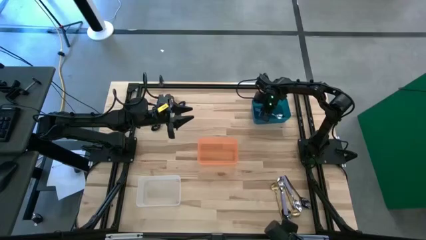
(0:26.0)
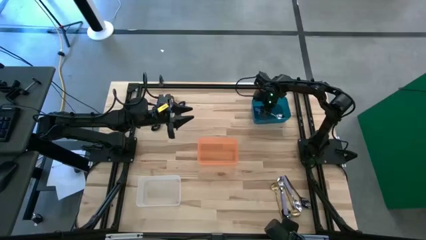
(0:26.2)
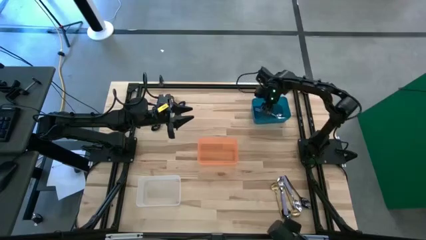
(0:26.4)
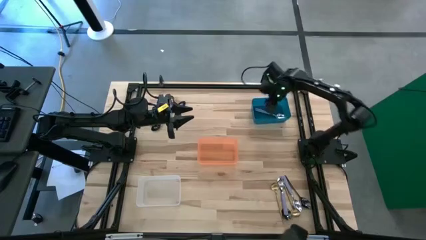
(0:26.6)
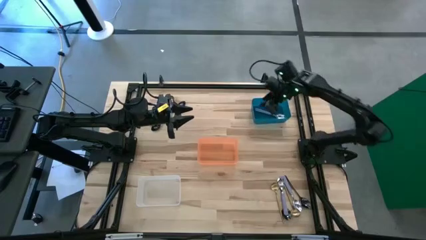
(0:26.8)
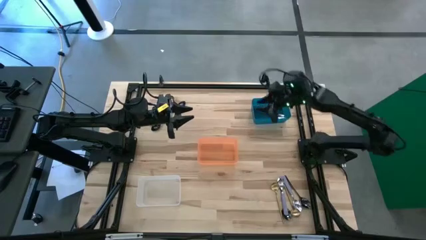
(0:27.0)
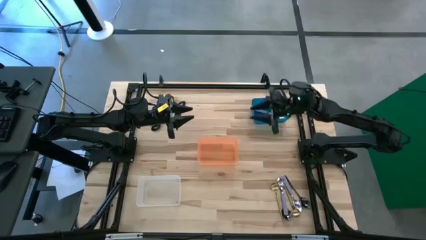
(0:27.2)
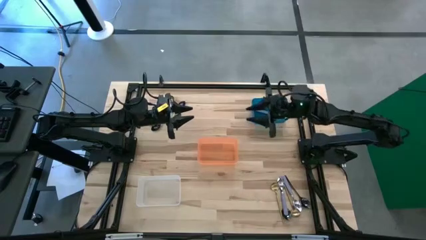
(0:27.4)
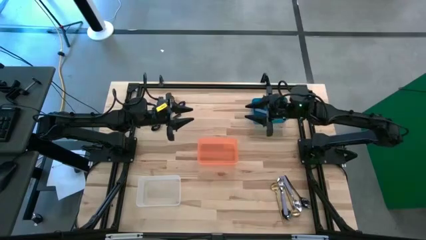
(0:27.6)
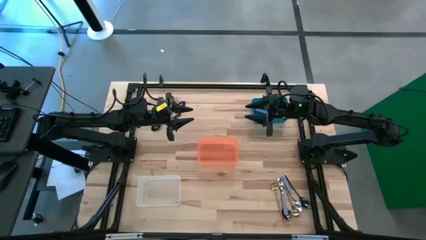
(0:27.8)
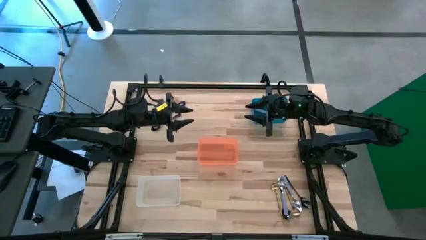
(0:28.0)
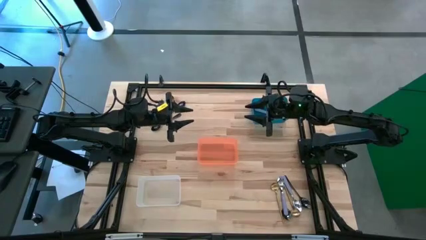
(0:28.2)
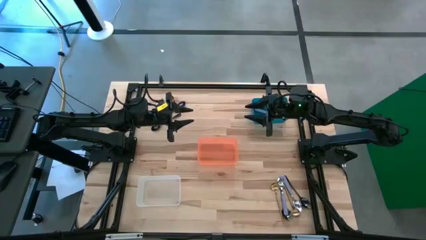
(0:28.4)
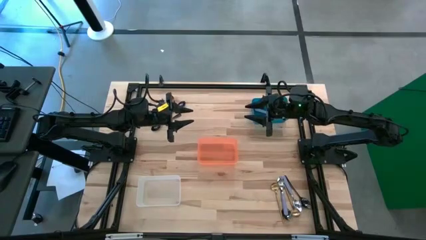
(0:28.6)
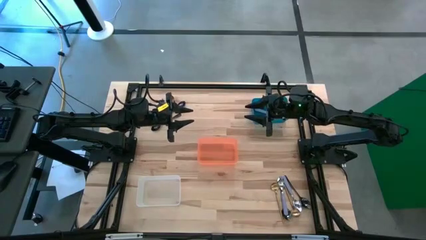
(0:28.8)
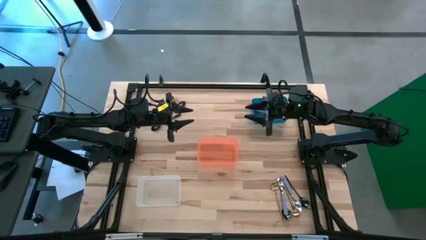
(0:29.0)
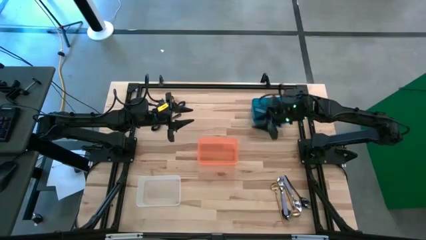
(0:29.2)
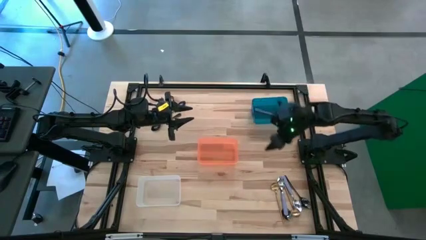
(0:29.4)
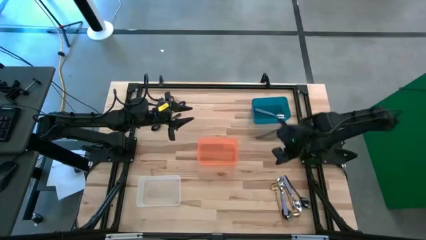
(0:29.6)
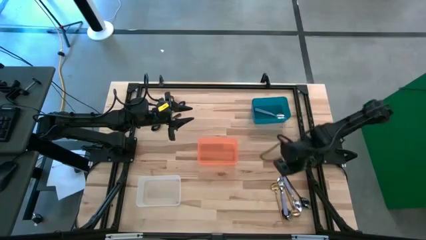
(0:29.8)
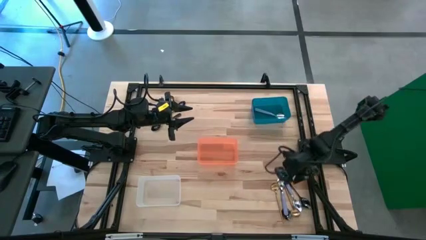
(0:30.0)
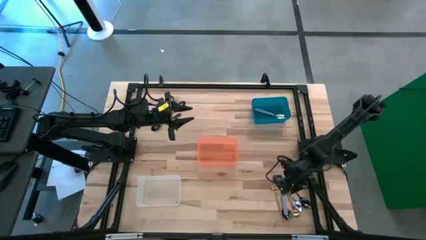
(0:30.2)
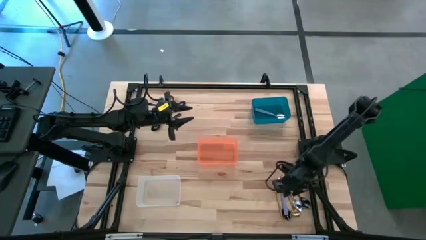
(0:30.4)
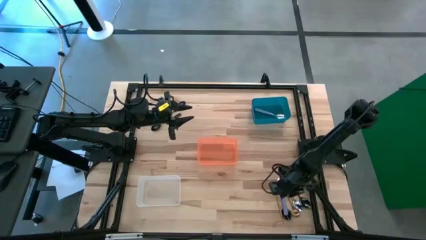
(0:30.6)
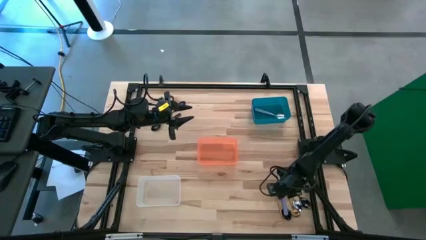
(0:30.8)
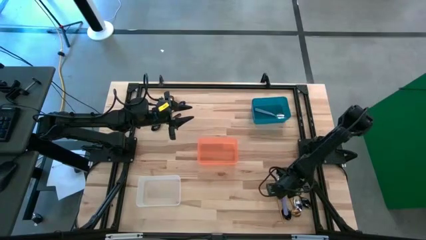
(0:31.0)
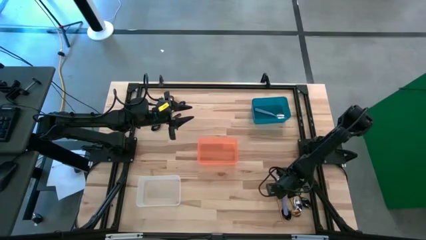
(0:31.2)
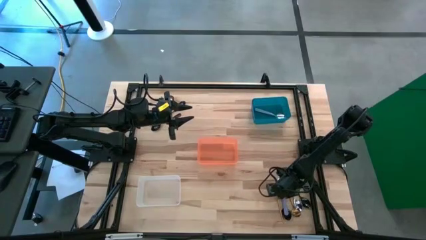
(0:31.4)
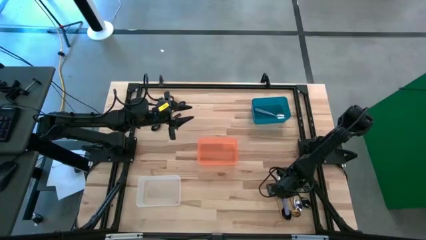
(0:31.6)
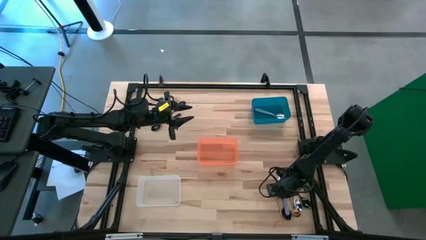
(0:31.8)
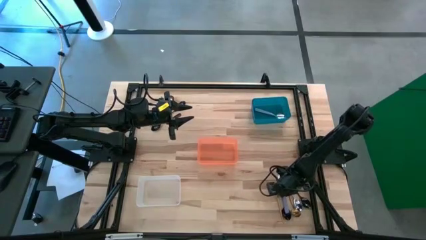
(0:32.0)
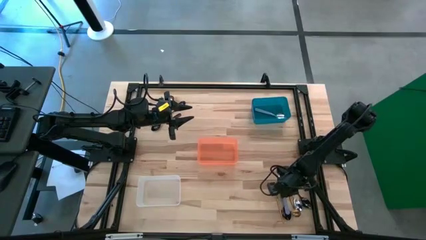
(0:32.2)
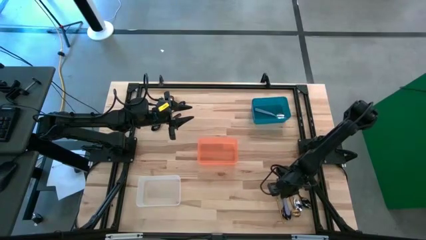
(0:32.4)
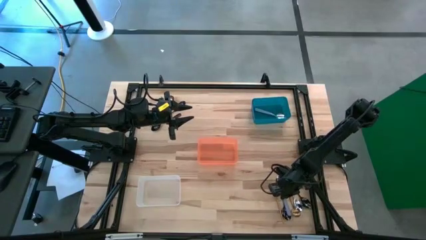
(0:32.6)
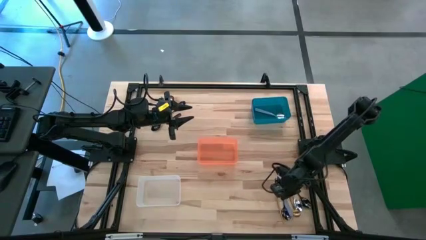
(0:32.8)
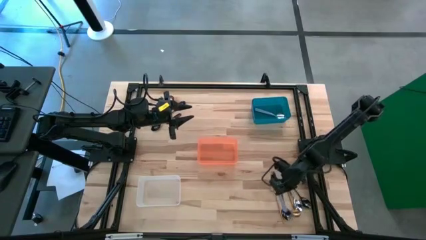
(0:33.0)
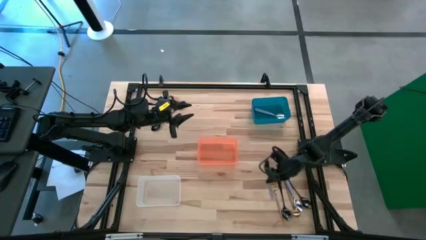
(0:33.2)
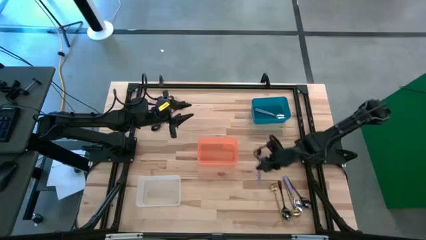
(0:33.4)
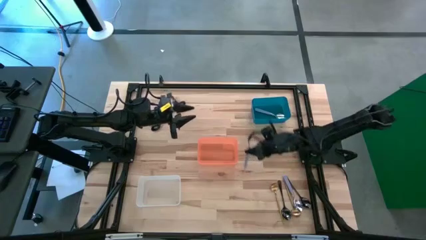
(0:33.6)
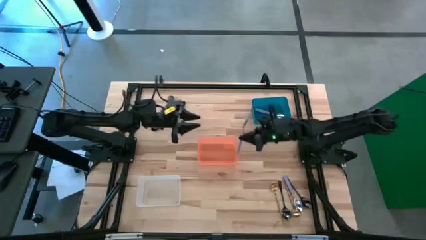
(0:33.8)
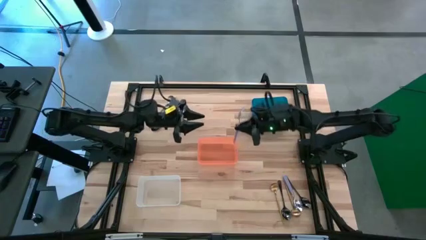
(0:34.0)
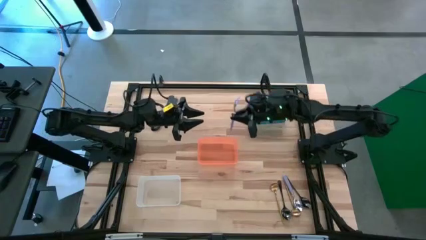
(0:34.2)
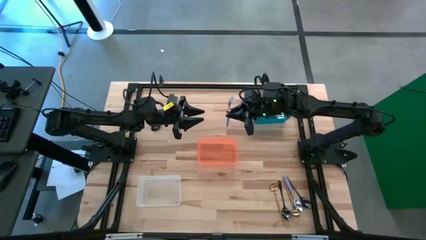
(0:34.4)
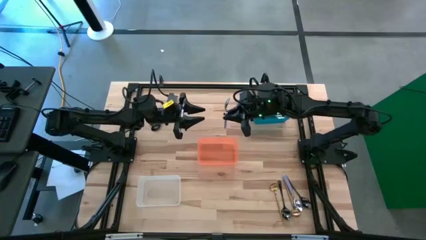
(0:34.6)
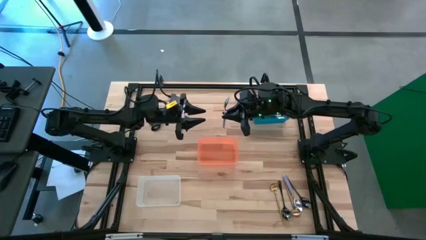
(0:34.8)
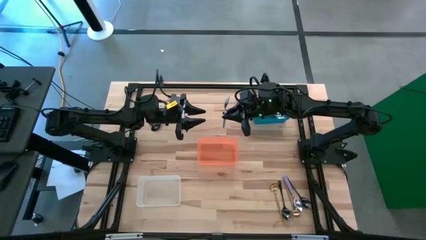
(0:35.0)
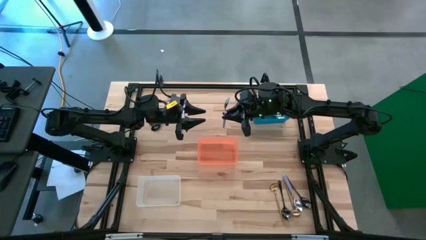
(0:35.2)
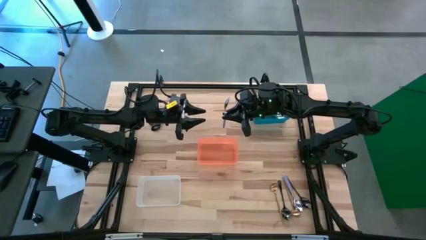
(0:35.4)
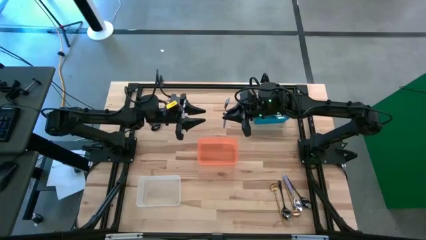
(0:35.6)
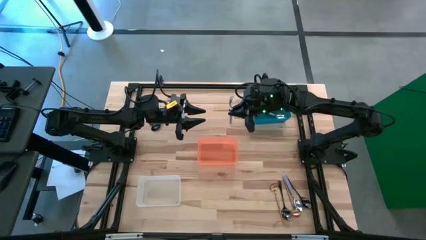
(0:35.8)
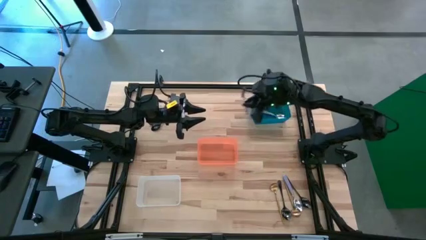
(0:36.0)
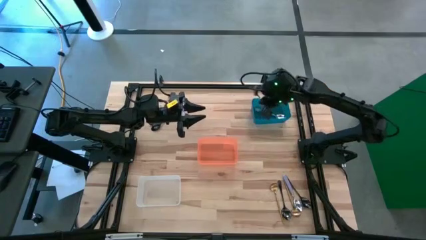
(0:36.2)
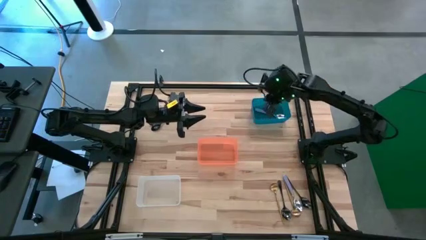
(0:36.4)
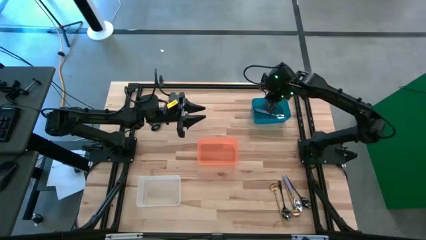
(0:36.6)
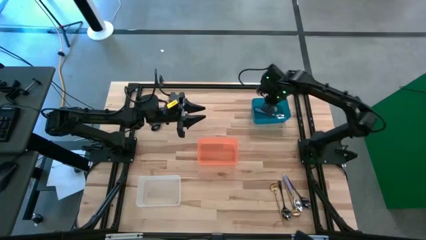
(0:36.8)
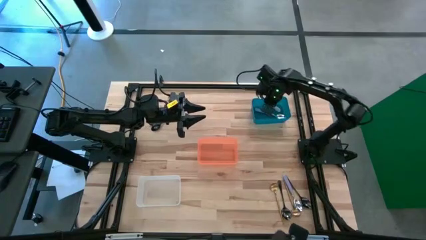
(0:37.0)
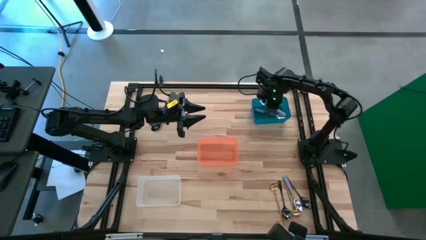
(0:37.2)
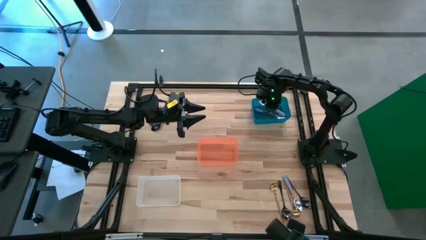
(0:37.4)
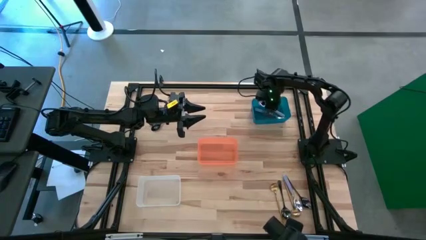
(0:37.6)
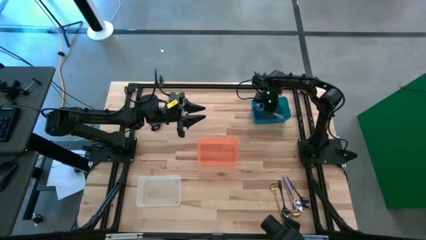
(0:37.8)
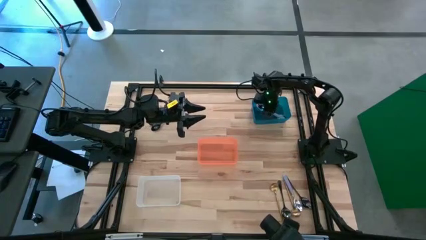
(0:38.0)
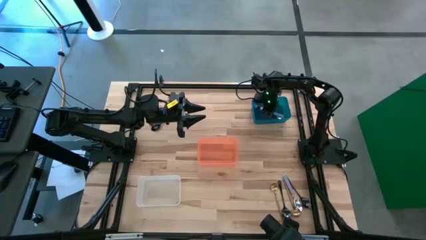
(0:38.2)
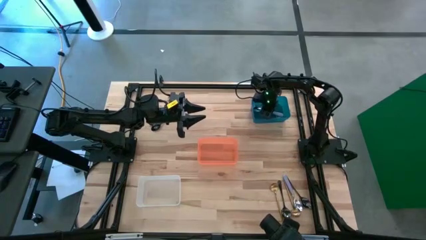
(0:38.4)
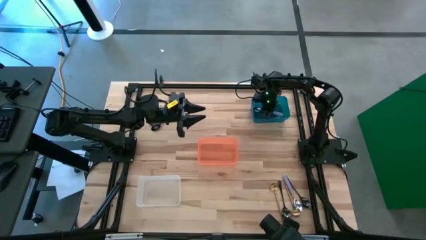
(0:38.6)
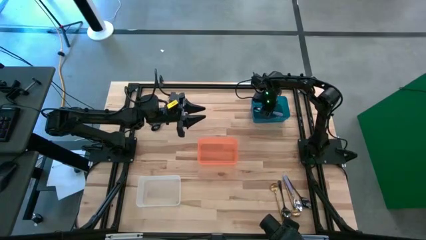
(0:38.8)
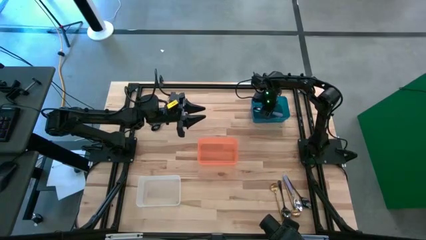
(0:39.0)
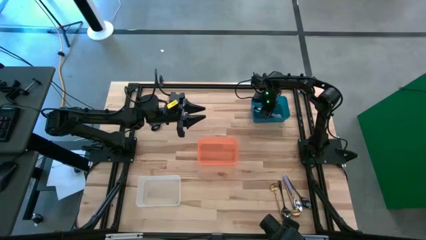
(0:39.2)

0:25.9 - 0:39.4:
Task: Sort silverware by color (type)
Put the bottom left violet spoon into the blue bin

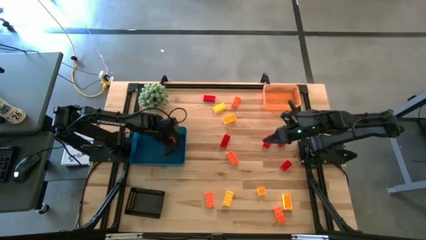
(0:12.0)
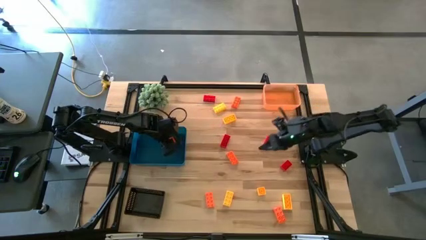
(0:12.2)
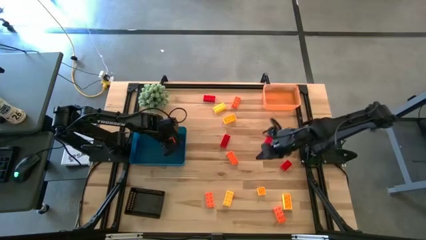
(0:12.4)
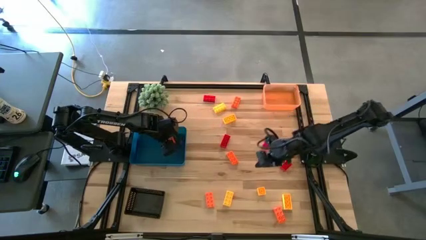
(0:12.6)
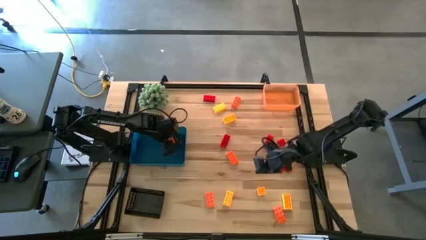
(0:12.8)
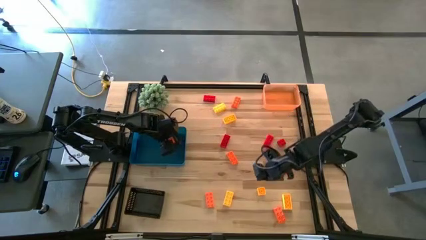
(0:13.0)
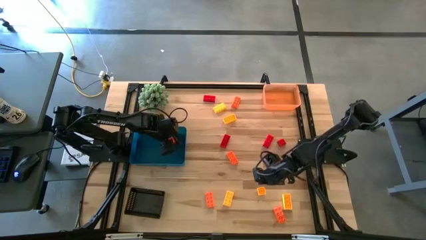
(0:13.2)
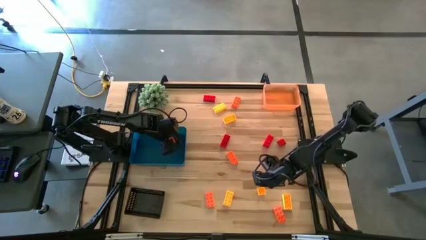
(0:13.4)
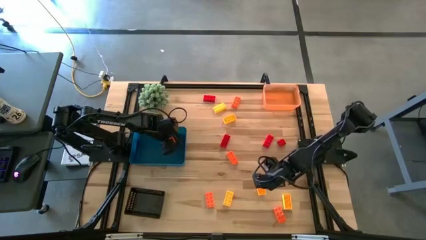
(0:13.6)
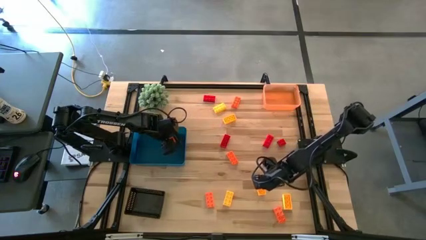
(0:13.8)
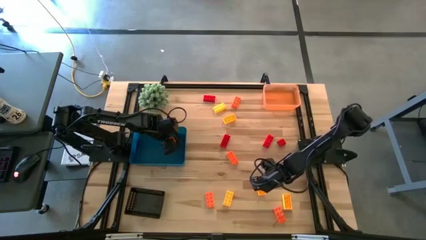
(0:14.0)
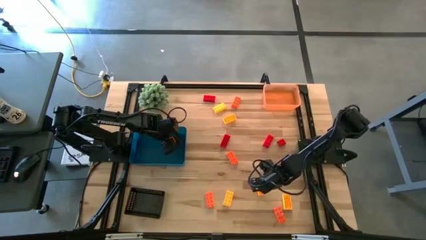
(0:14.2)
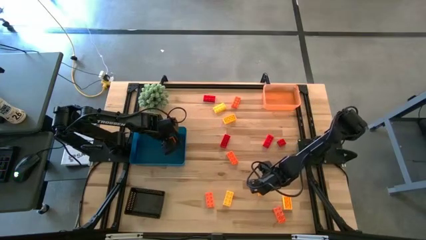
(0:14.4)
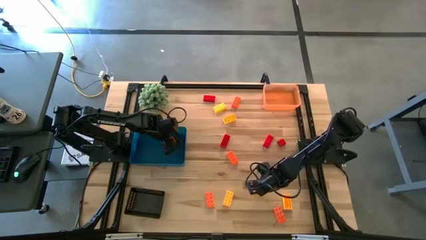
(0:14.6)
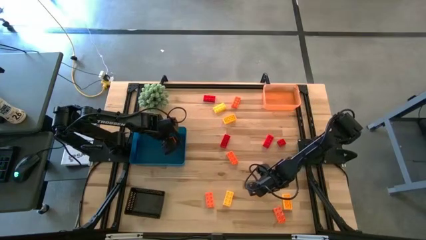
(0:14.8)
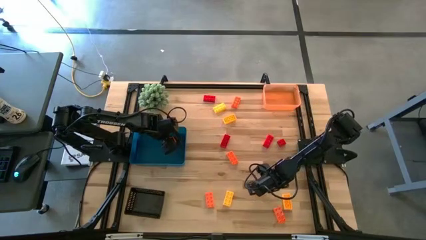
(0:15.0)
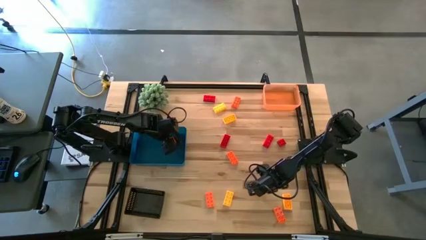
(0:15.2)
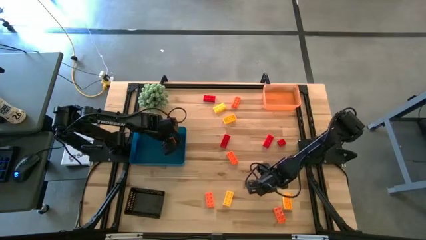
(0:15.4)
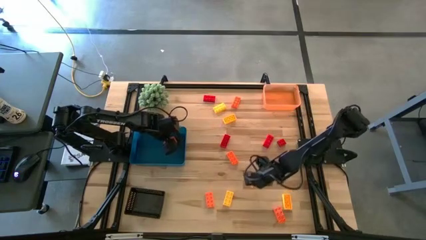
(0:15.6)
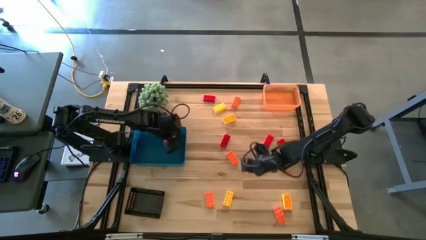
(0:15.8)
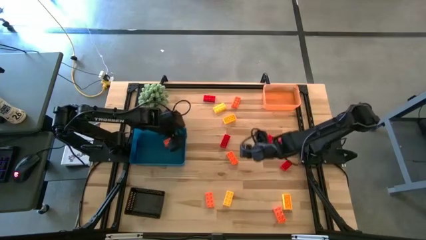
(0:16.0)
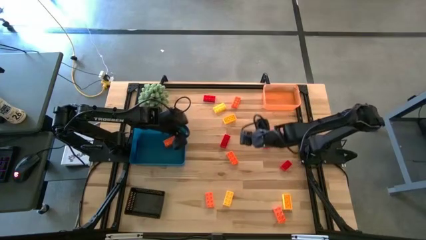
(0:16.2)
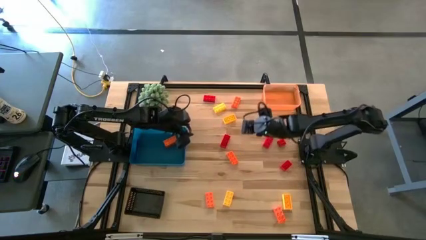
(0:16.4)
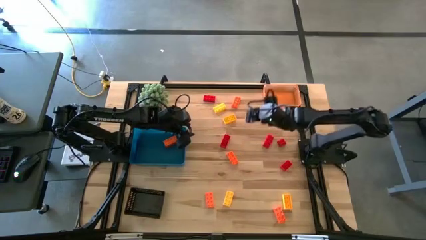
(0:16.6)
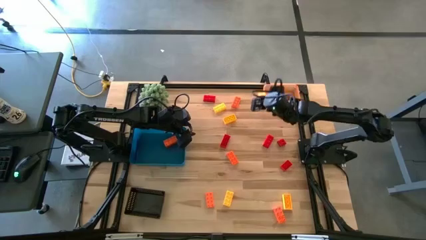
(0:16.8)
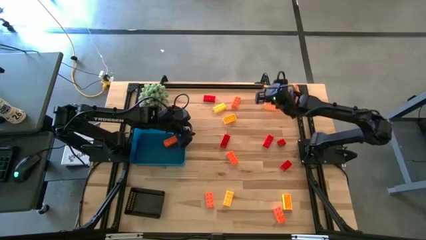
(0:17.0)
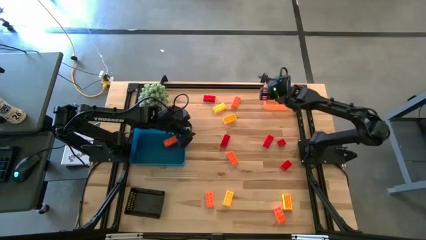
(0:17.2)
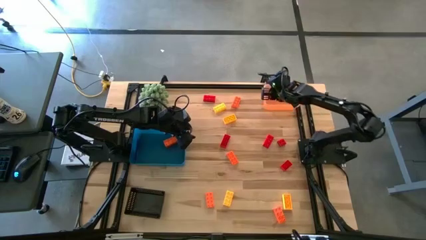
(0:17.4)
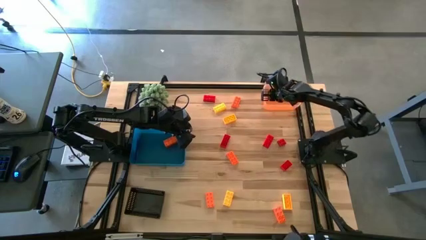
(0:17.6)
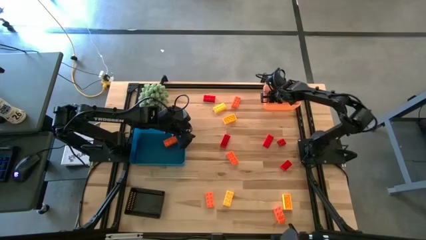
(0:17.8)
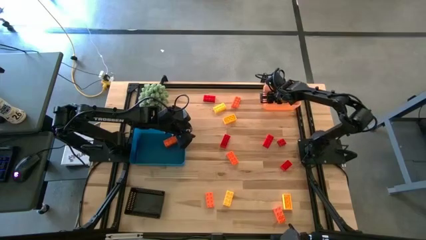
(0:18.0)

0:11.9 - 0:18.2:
Task: Sort & place blocks by color
Put the yellow game piece into the orange bin
